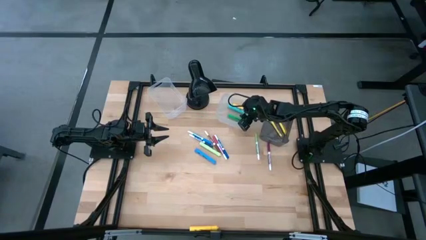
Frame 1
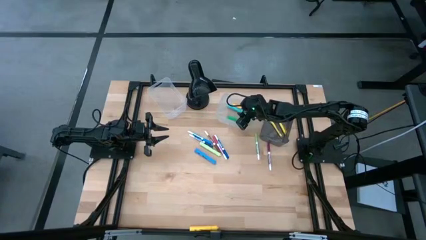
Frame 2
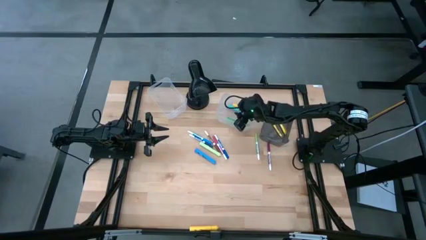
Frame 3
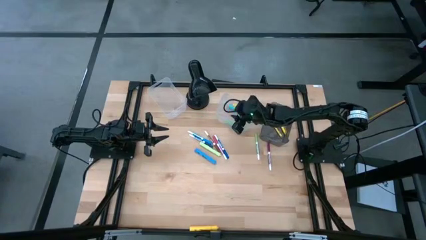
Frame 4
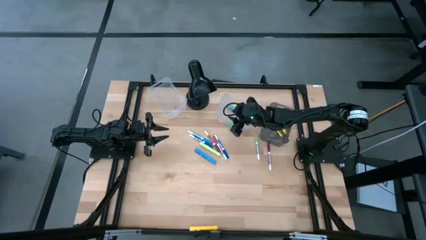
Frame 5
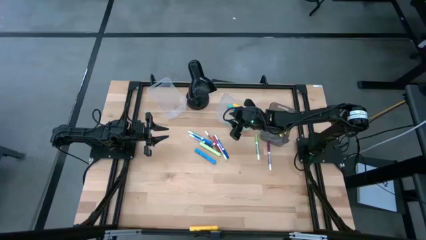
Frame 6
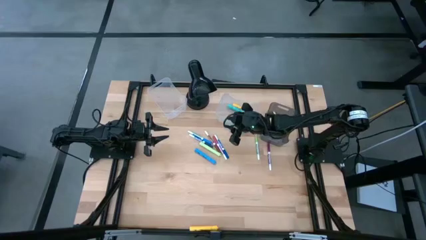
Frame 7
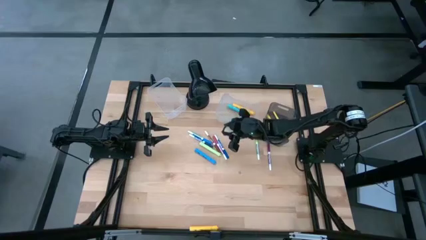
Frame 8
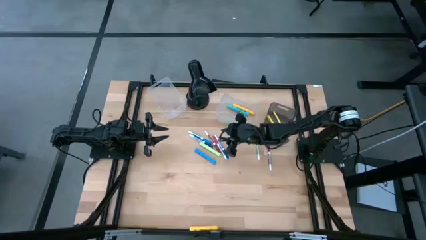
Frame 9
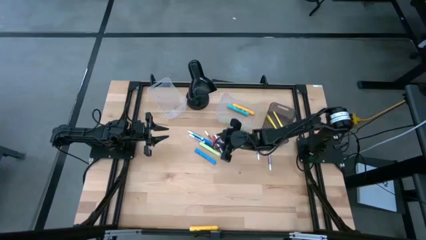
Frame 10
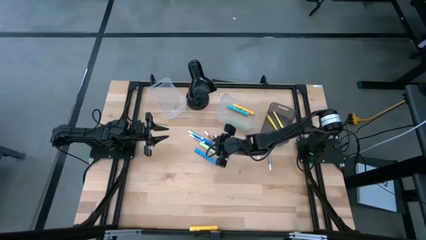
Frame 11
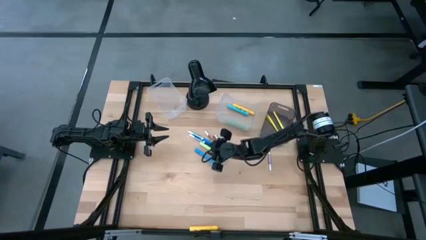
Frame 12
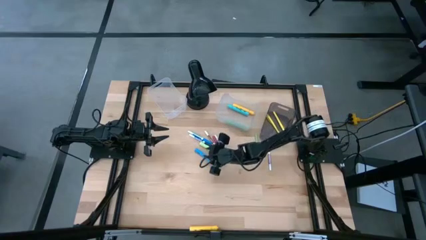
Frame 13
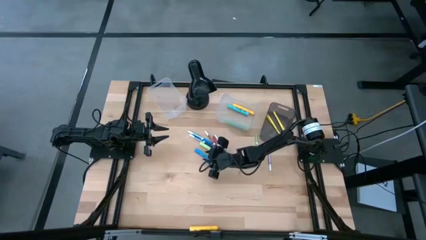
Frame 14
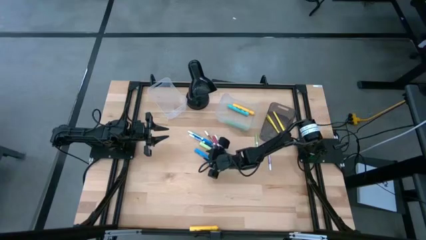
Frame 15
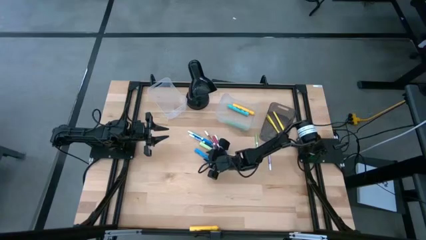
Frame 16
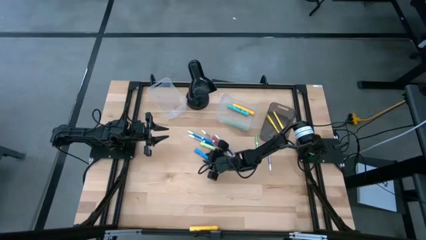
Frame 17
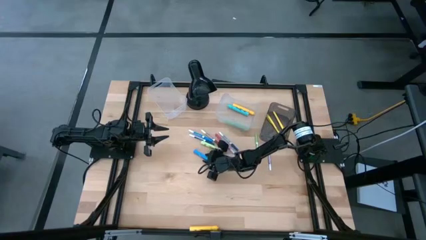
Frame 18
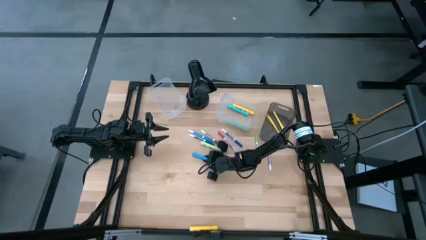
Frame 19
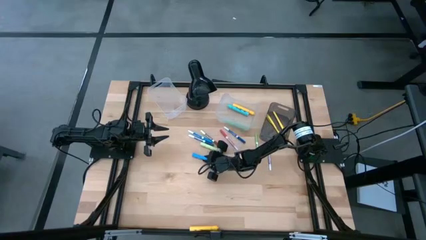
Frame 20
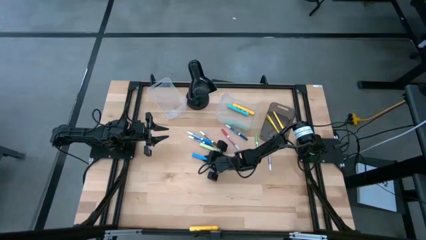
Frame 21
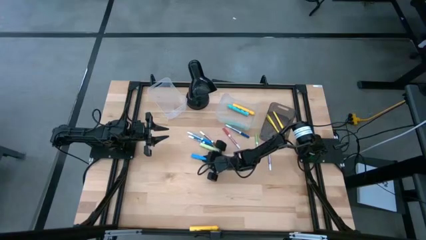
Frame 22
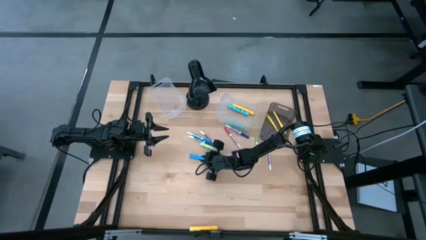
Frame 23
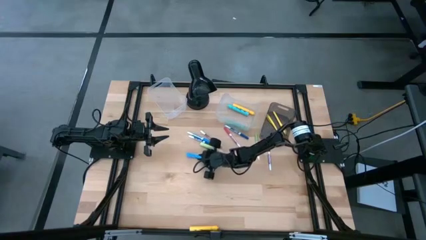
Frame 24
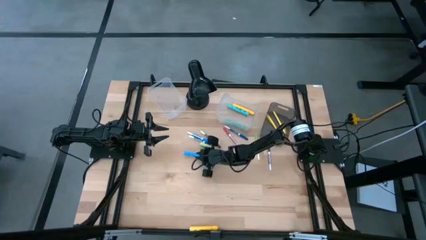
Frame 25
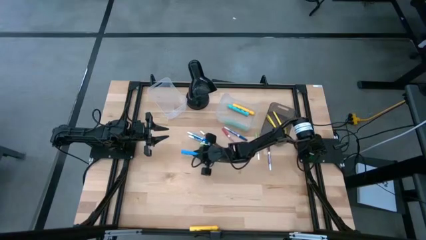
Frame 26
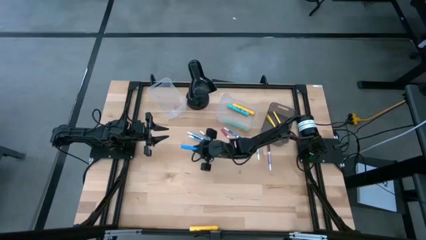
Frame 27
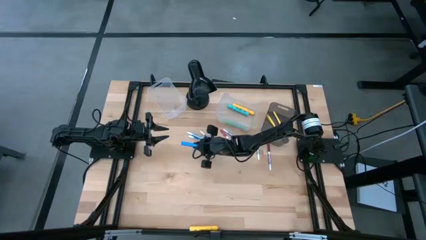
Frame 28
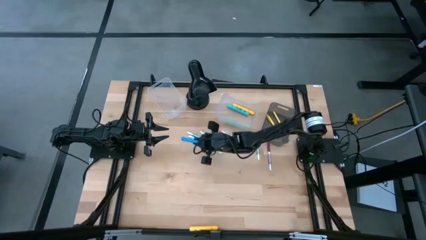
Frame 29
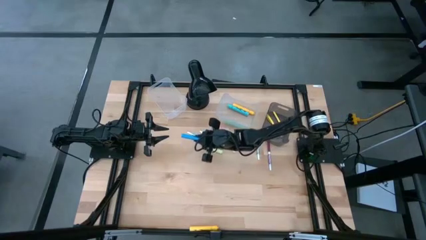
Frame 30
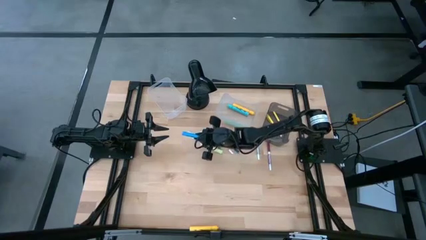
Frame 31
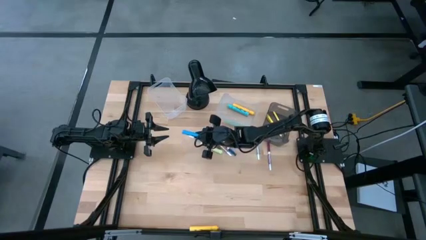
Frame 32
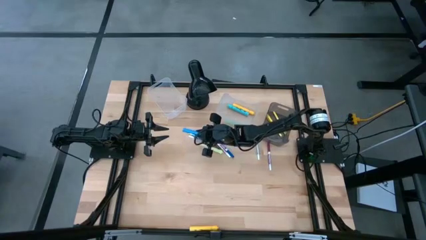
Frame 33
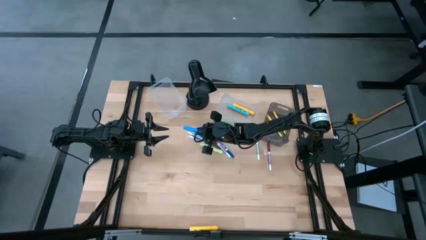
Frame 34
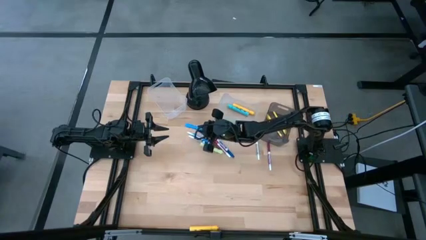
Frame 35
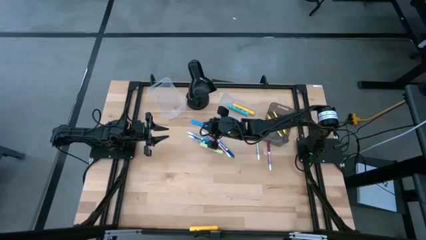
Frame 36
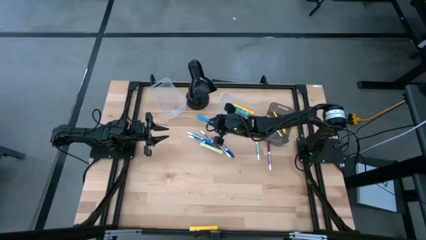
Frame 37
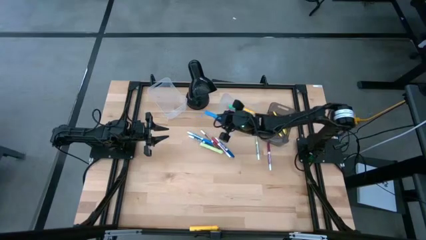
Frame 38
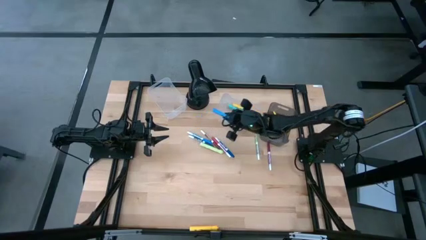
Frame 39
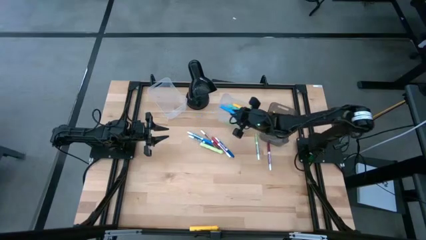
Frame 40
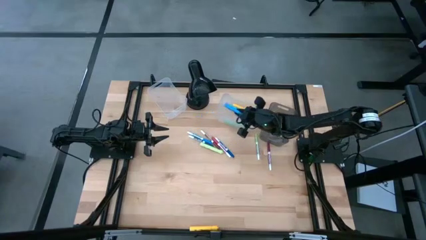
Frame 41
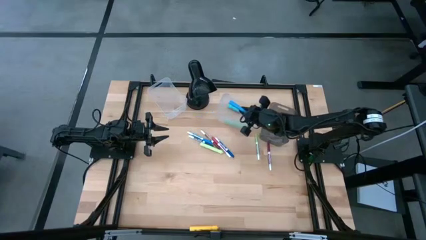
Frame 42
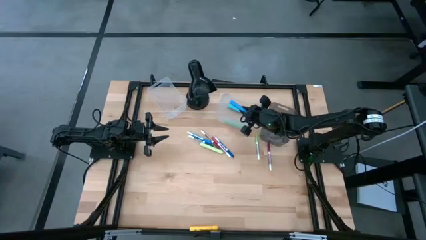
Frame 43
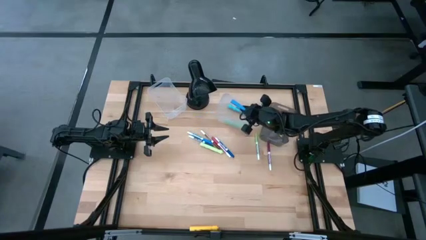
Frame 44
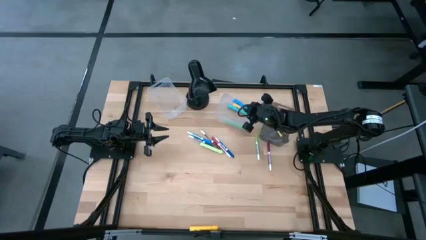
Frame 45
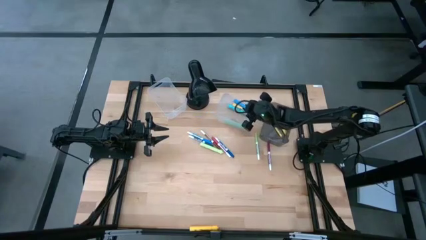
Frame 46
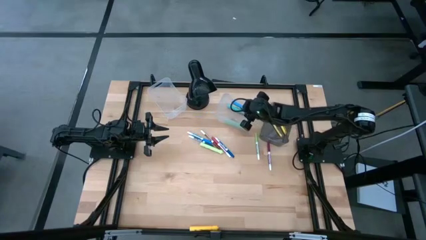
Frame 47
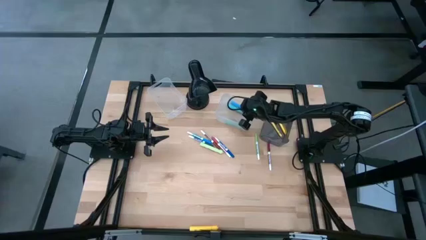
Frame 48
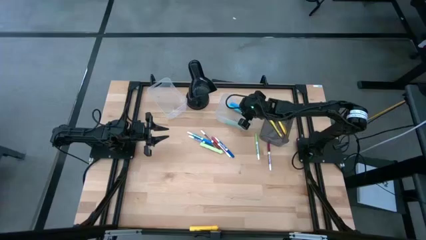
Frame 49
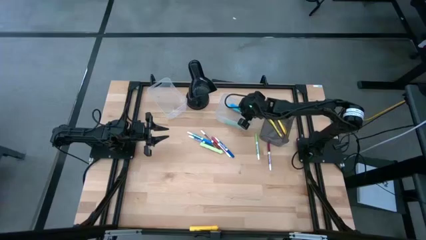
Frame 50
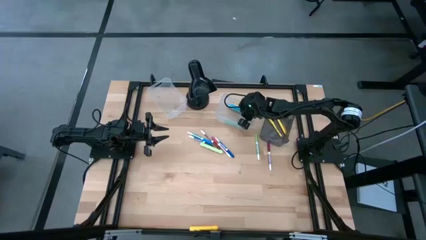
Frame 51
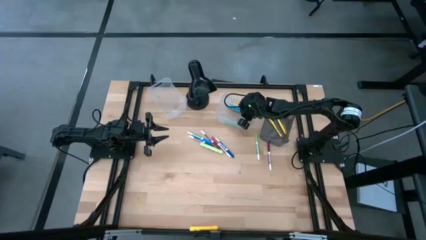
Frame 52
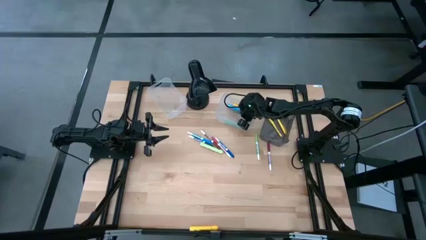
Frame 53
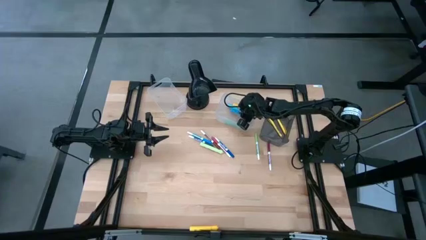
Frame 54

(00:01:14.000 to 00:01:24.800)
Task: Pick & Place Markers
Put the blue highlighter in the right transparent bin
